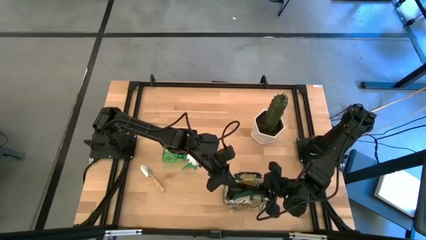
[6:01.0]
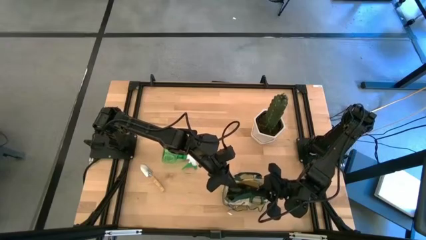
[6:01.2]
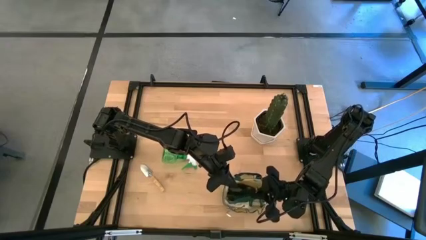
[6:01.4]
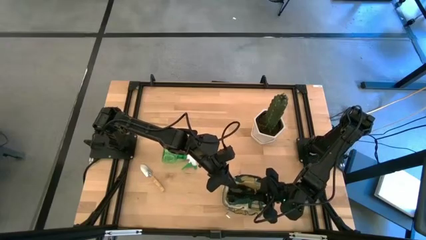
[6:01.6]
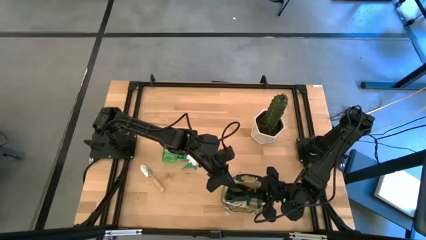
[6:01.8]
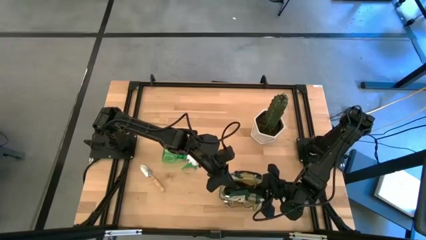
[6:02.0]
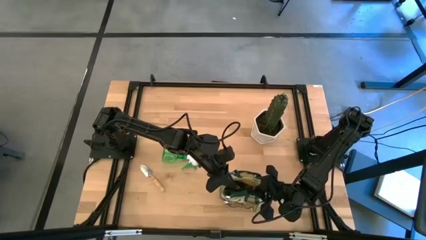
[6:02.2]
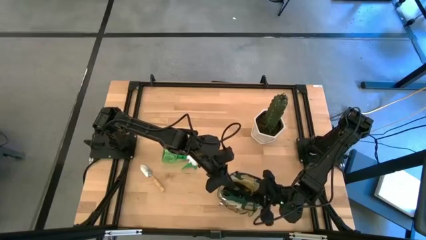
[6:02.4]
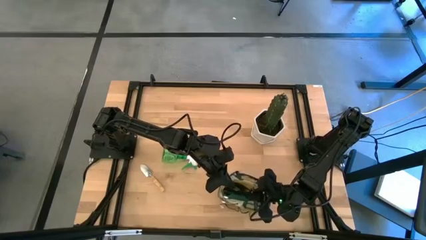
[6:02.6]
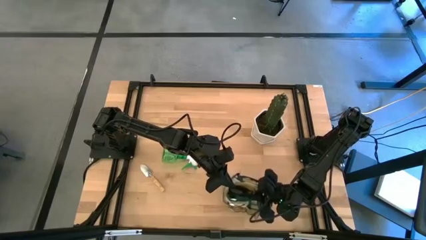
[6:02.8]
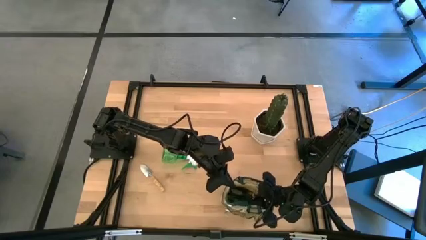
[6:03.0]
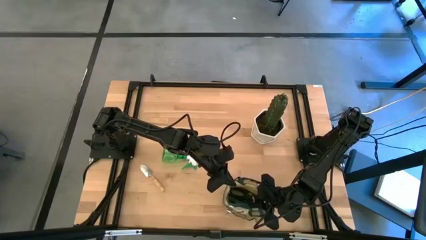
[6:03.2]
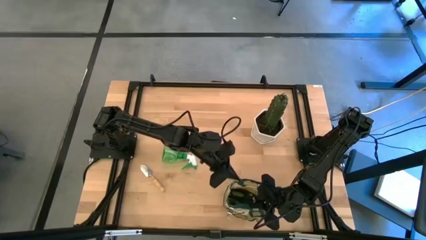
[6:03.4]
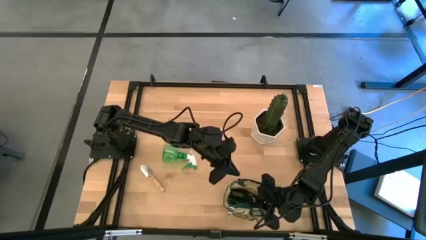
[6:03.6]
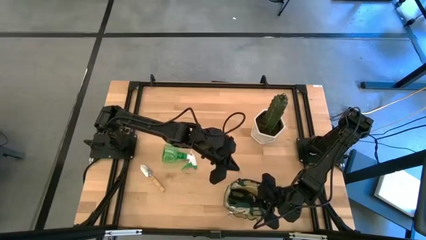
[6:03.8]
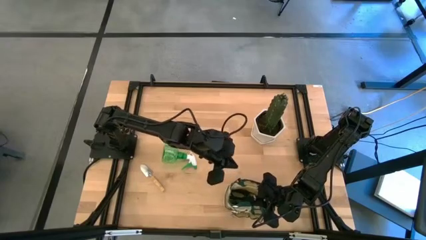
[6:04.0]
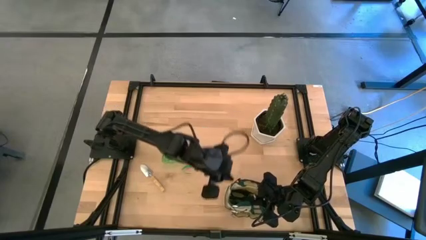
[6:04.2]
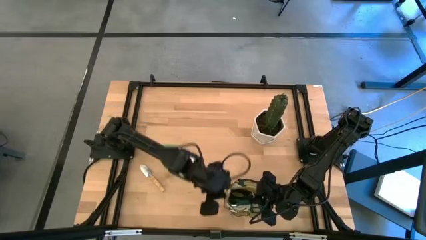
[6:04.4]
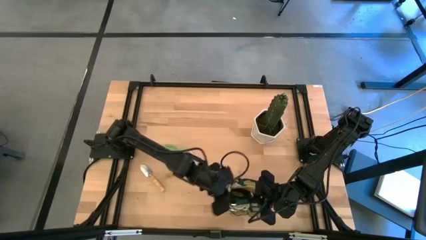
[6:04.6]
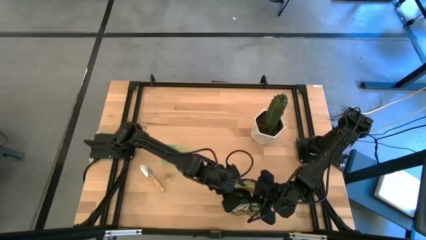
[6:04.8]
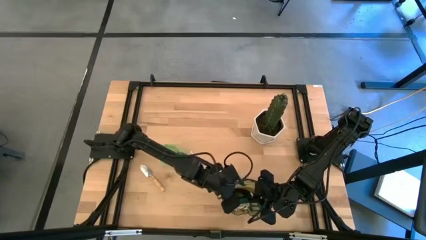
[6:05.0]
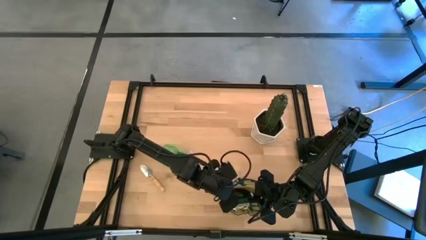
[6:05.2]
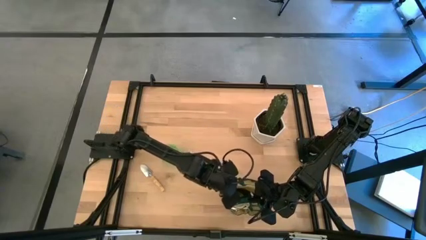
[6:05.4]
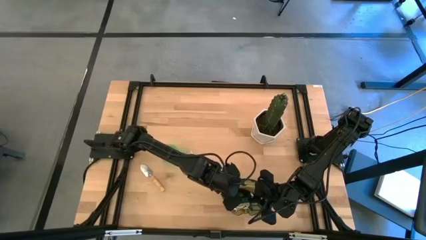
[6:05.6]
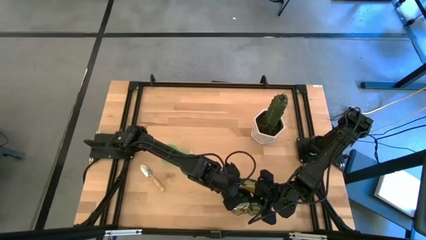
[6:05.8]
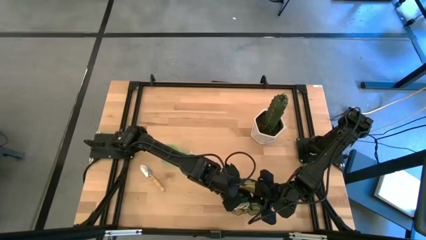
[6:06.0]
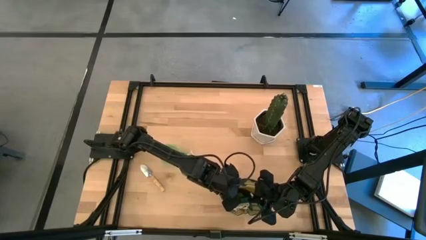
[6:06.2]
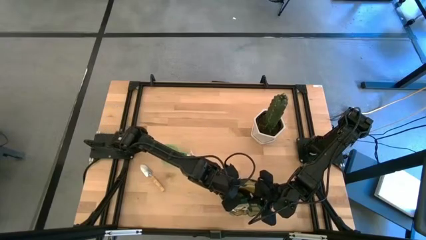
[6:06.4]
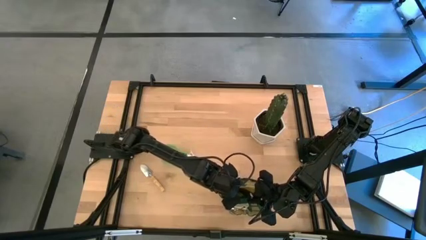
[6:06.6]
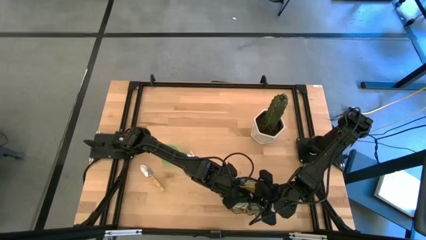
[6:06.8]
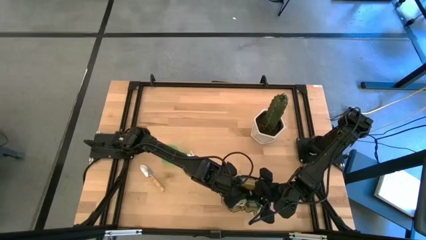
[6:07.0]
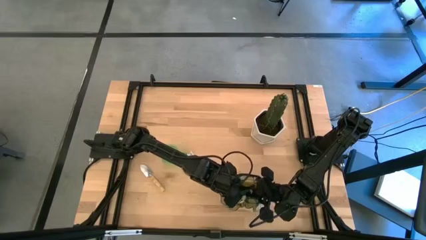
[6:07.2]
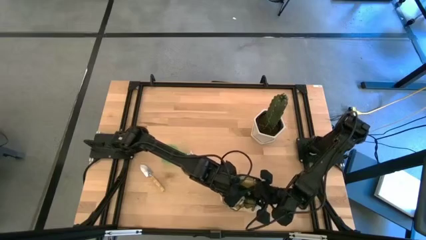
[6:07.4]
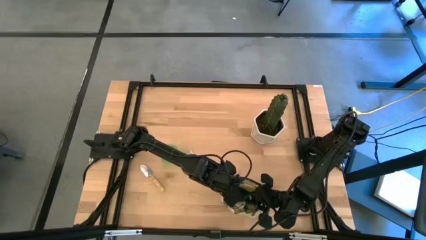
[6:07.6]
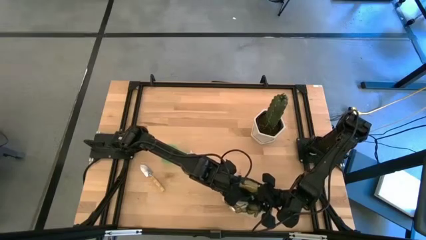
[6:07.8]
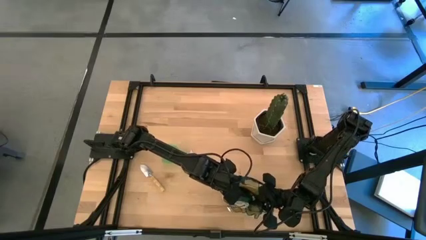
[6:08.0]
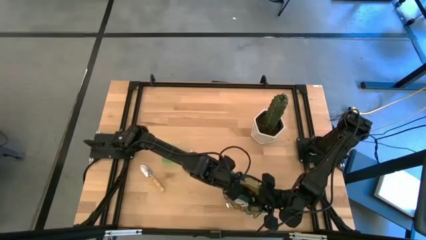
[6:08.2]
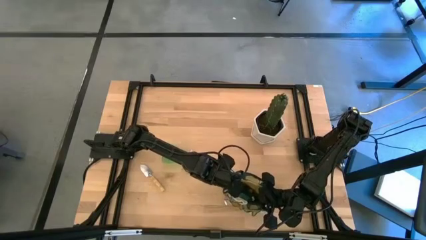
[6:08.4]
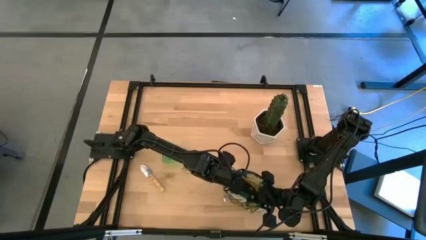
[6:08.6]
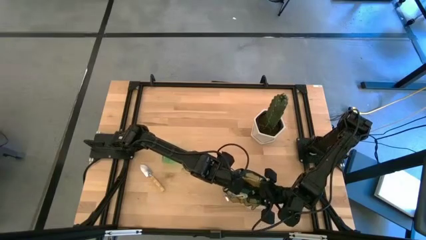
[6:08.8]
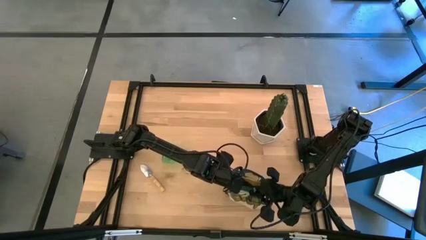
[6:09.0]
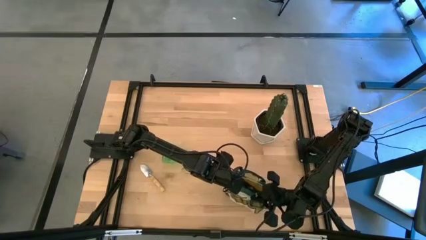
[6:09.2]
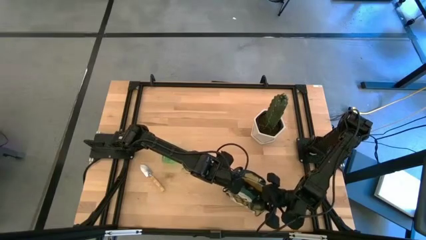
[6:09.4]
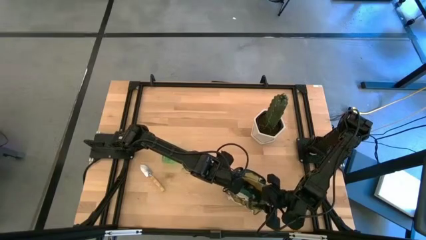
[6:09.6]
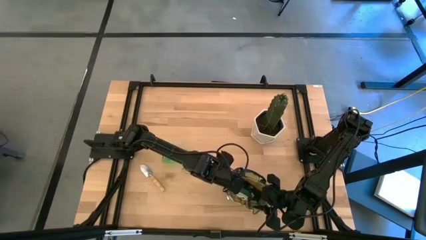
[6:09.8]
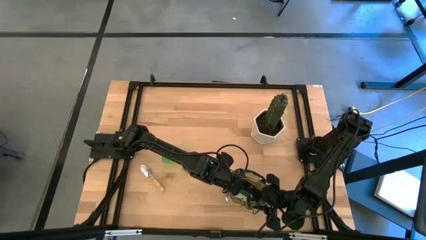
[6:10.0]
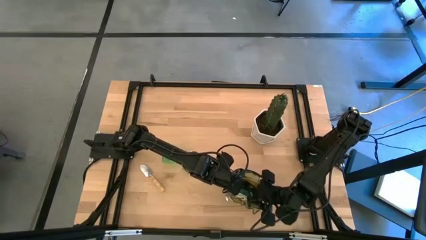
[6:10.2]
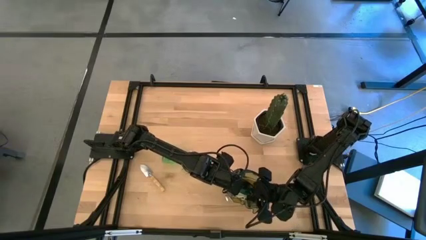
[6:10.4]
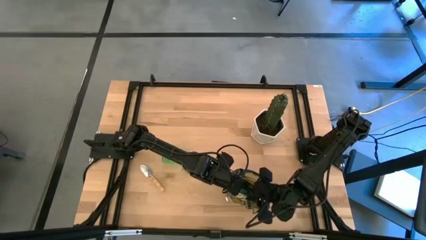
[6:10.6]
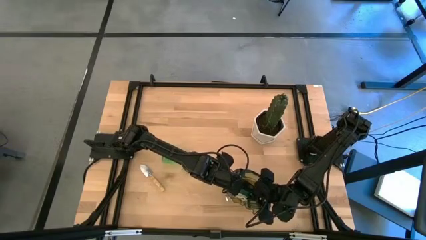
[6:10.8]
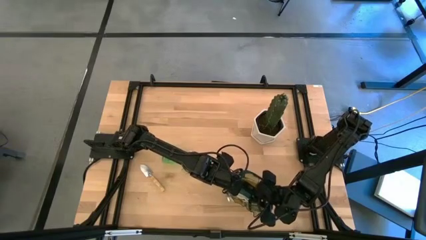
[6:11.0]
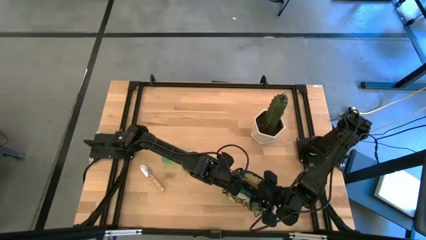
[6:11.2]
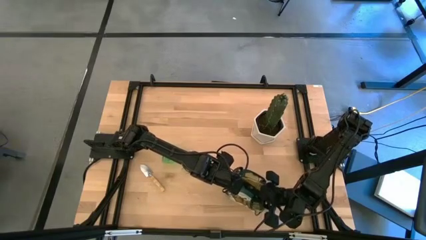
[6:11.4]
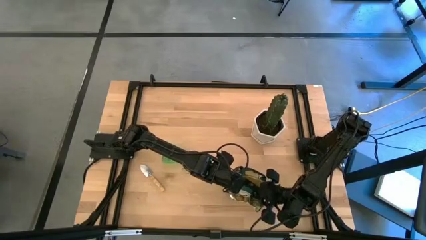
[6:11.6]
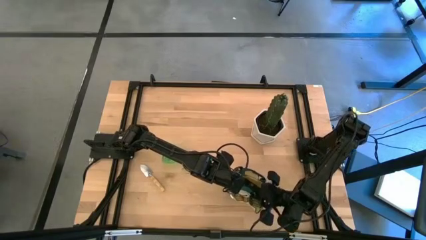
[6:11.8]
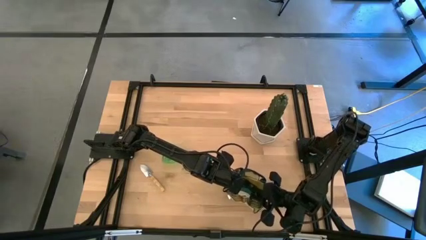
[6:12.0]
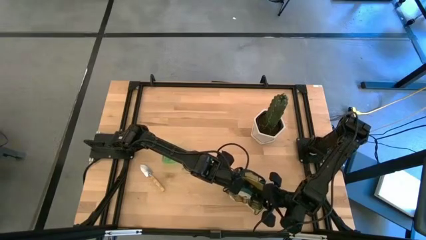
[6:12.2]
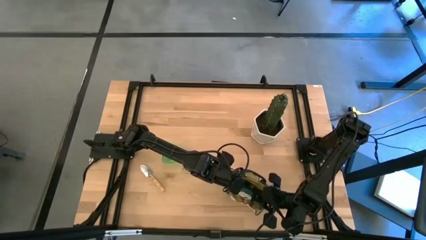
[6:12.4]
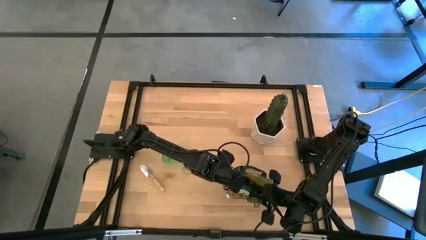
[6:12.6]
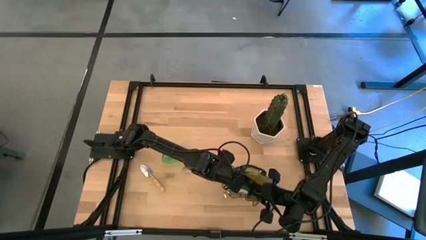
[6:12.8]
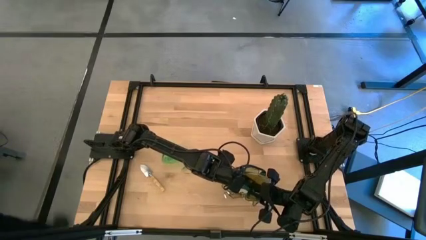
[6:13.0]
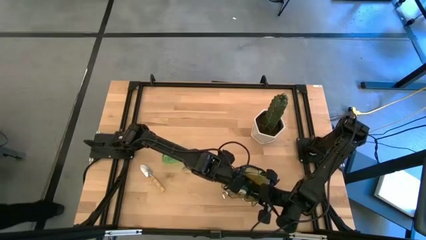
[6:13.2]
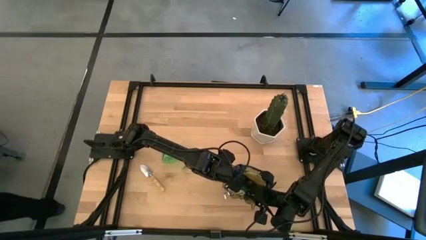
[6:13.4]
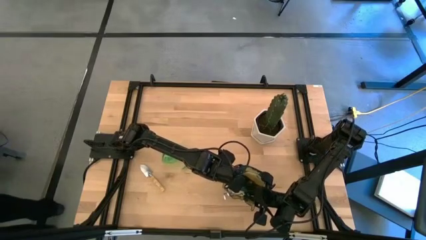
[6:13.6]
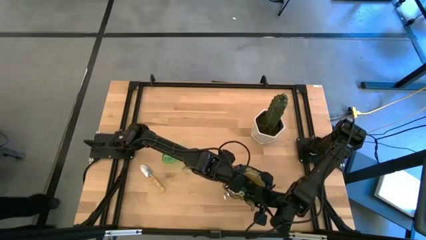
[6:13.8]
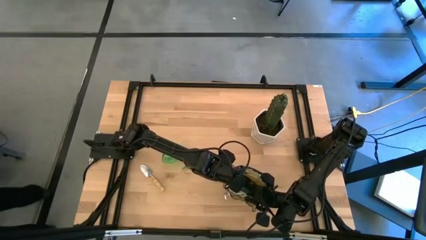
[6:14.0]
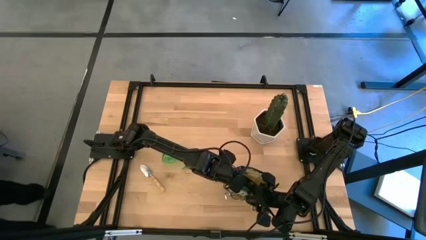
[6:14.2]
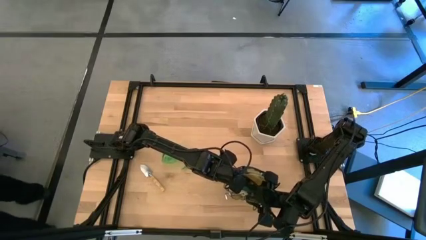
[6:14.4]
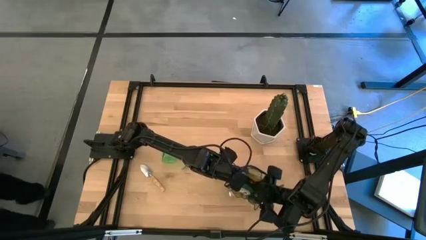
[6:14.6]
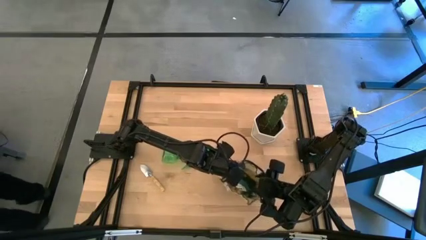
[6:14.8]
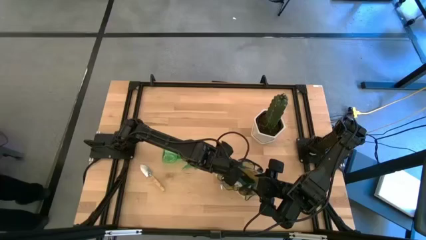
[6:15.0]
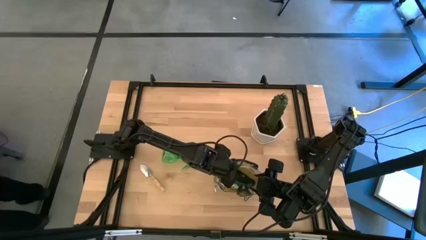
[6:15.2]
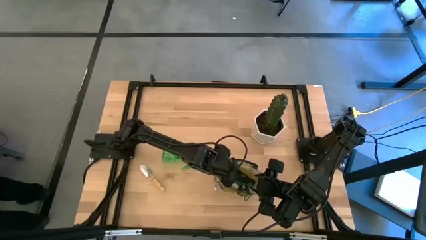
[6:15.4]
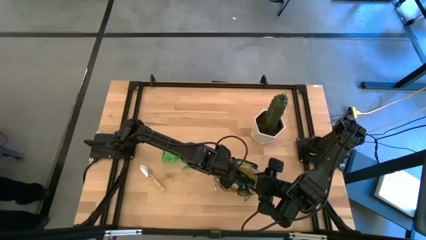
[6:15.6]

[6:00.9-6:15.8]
Task: Pick & Place Garden tools in Gardening bag
Put the grafting pruner into the side pocket of the white bag

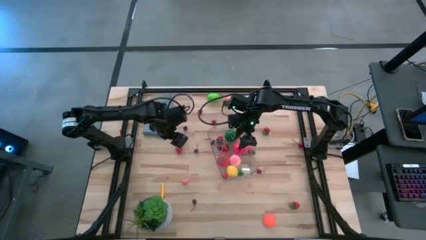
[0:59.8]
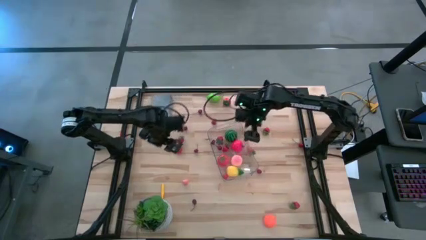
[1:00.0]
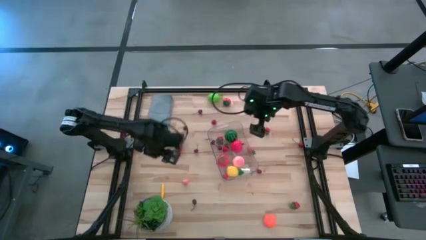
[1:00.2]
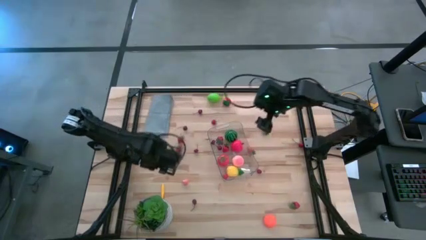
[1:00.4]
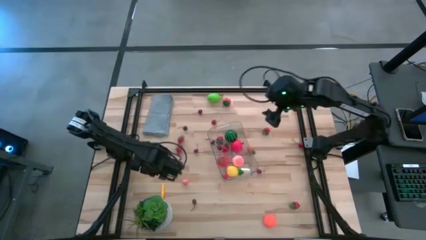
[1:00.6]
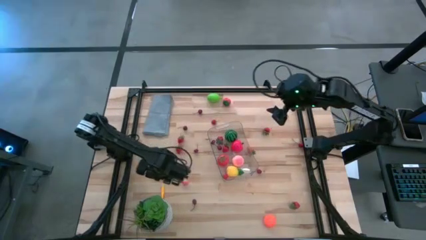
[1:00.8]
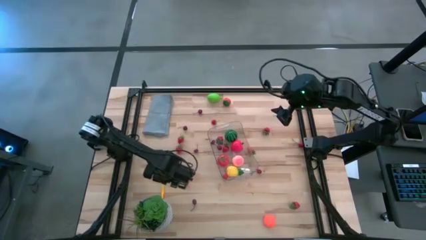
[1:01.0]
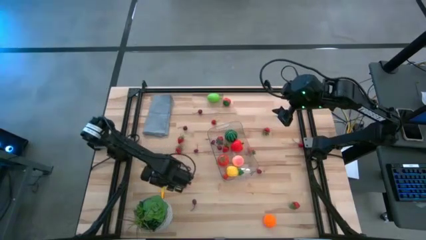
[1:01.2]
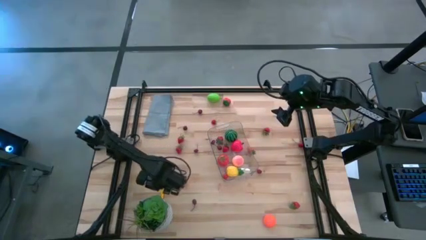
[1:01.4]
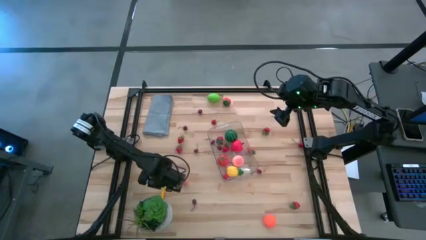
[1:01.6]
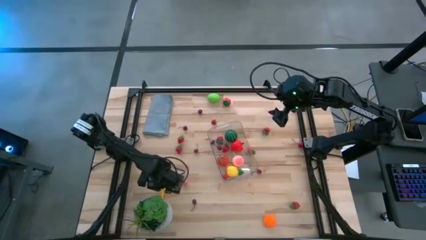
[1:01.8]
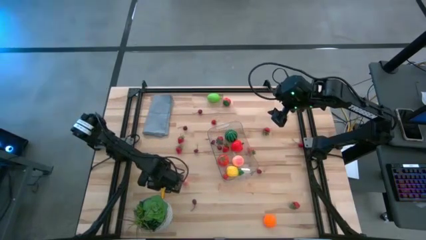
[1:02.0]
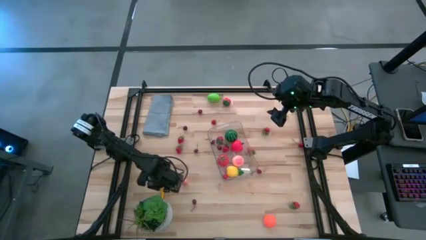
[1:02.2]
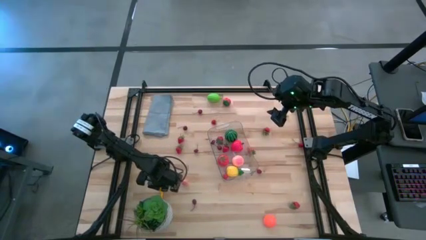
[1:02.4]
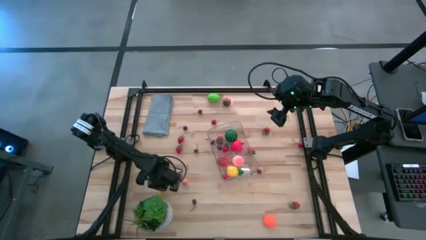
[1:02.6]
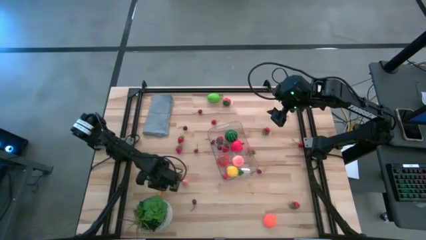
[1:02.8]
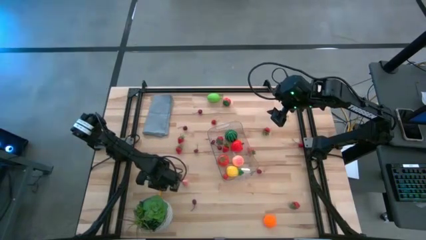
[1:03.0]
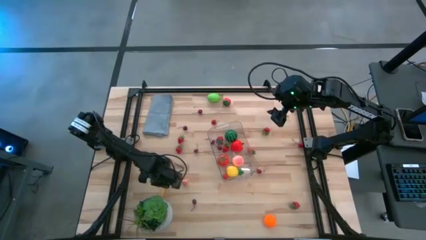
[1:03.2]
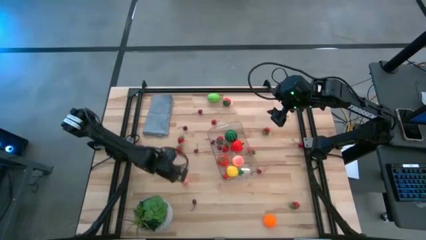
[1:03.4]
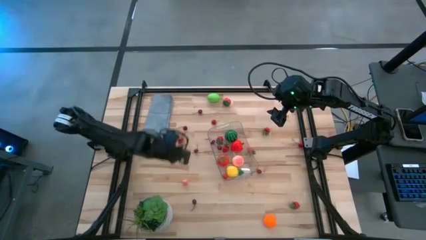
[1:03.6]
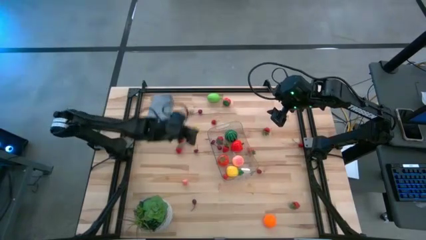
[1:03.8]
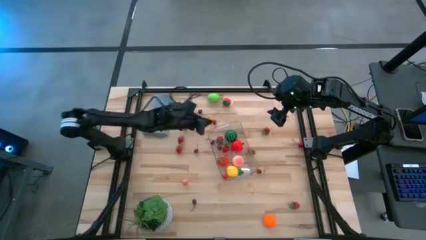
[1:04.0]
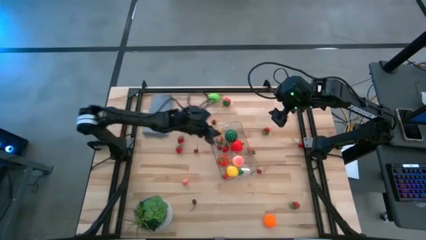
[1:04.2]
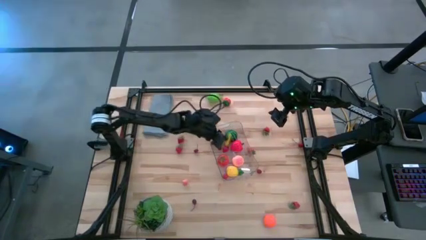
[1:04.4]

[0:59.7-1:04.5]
Task: Pick and placing Produce into tupperware
Put the yellow squash into the transparent bin
